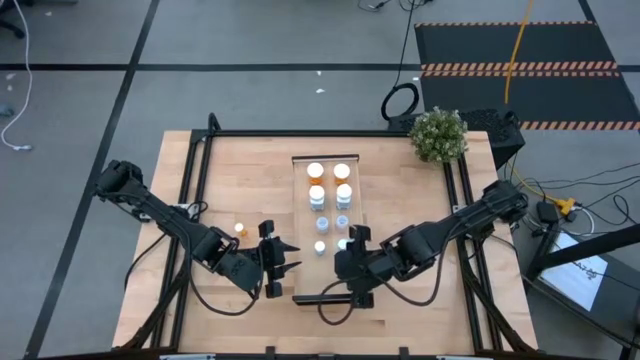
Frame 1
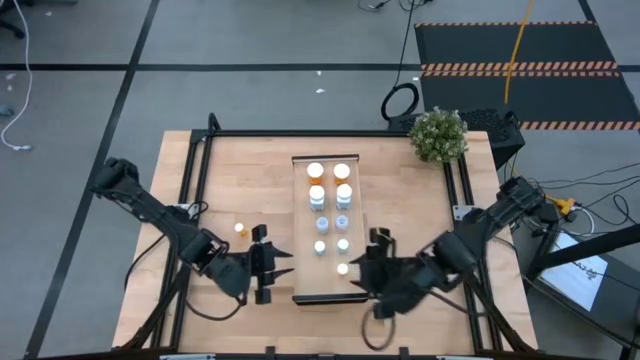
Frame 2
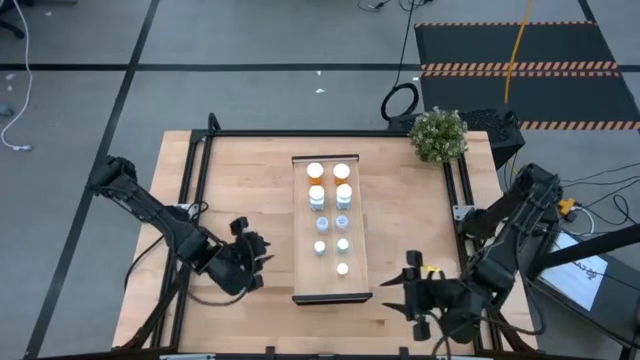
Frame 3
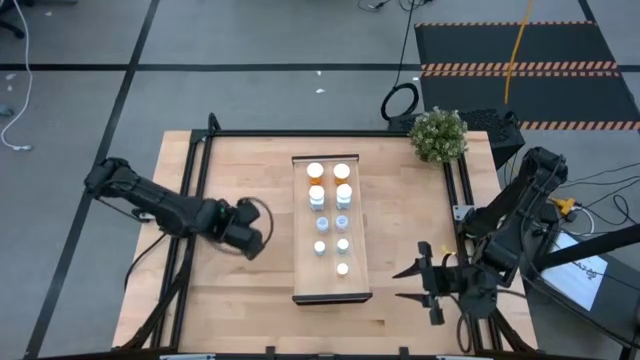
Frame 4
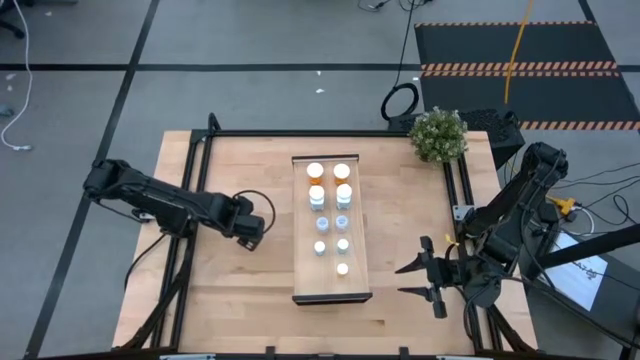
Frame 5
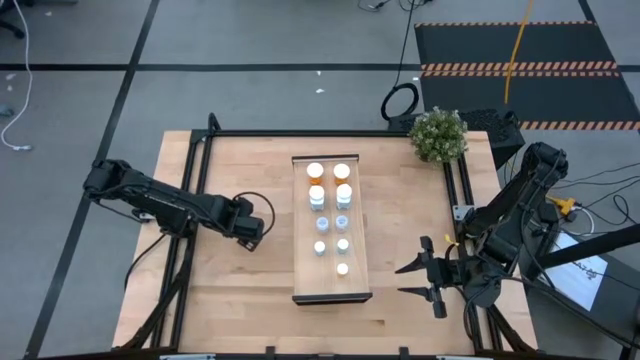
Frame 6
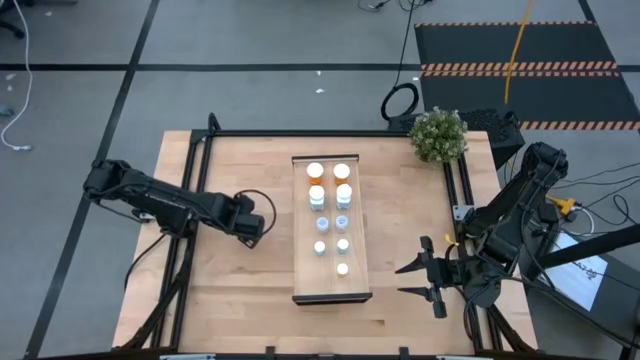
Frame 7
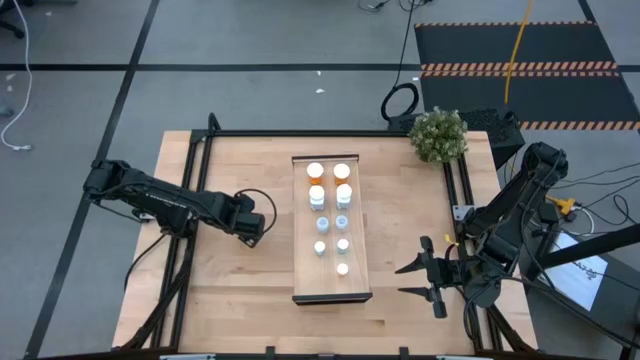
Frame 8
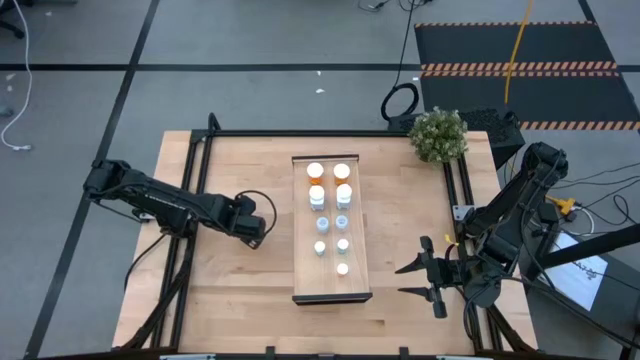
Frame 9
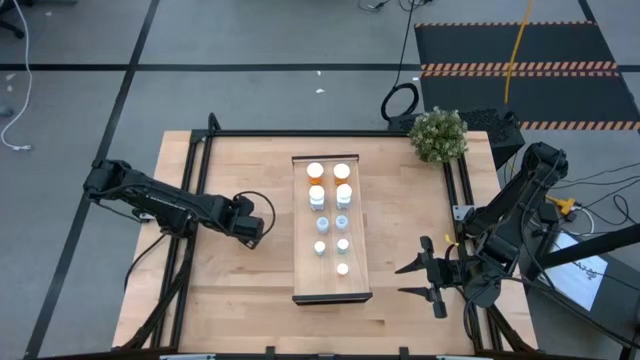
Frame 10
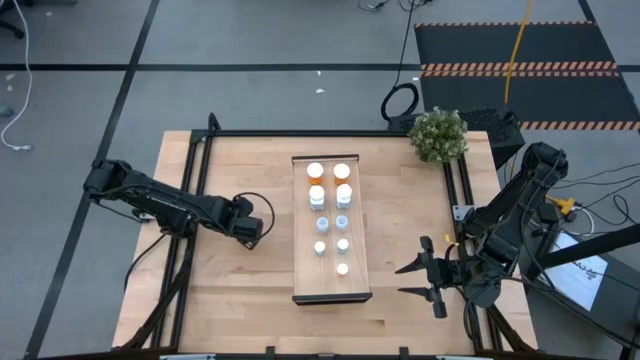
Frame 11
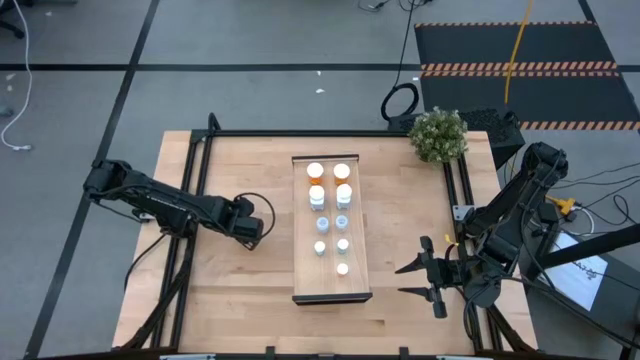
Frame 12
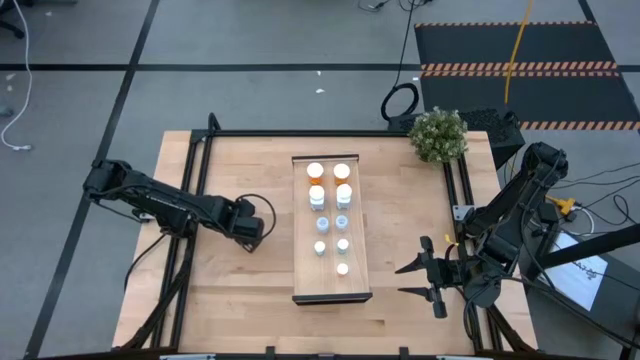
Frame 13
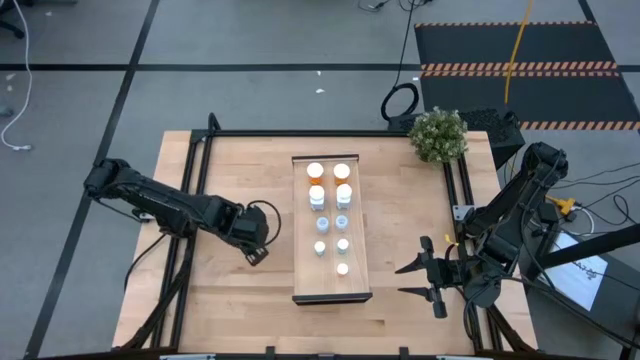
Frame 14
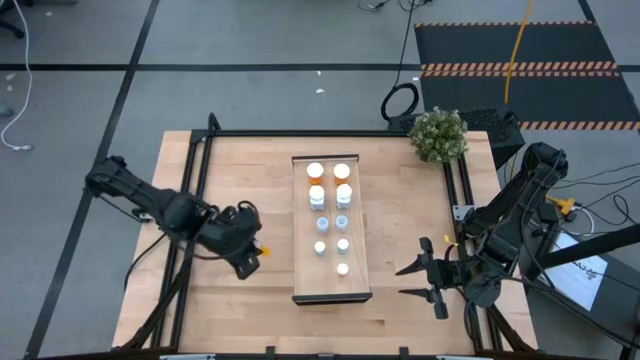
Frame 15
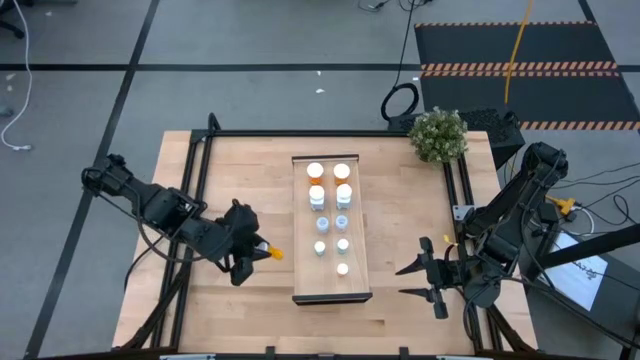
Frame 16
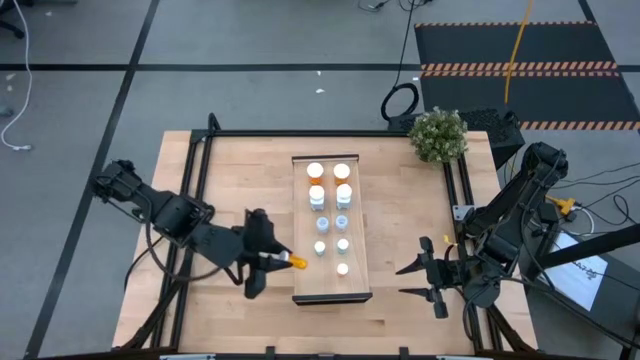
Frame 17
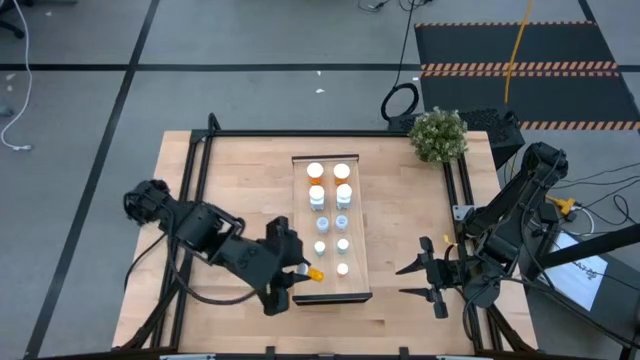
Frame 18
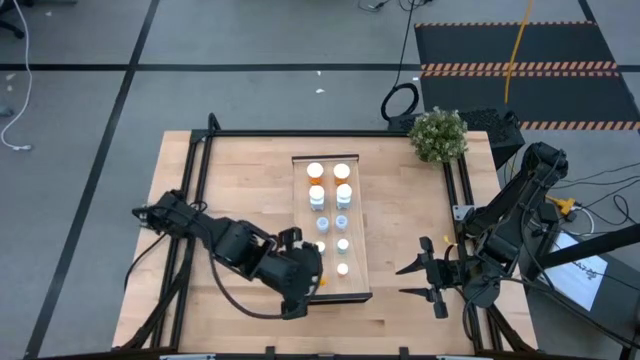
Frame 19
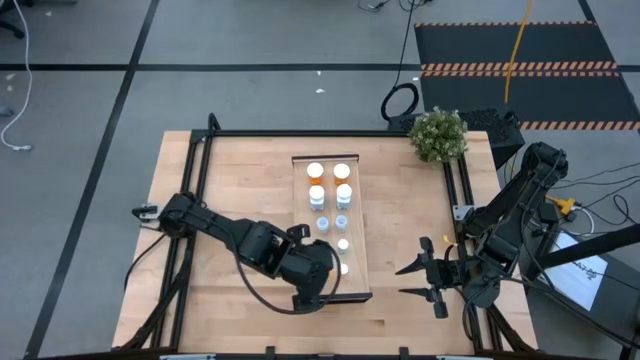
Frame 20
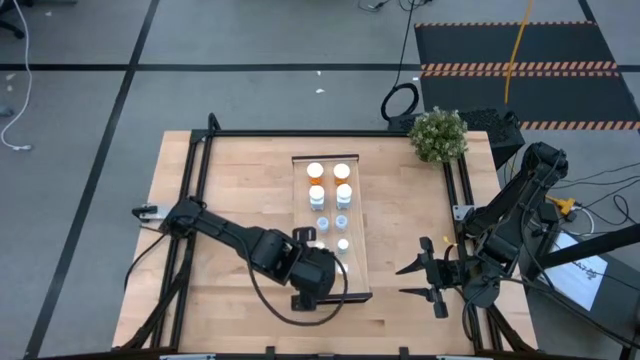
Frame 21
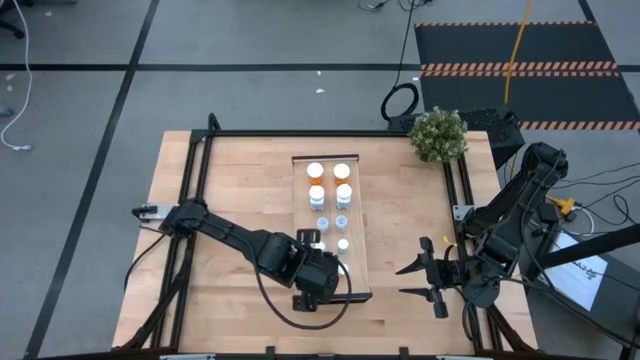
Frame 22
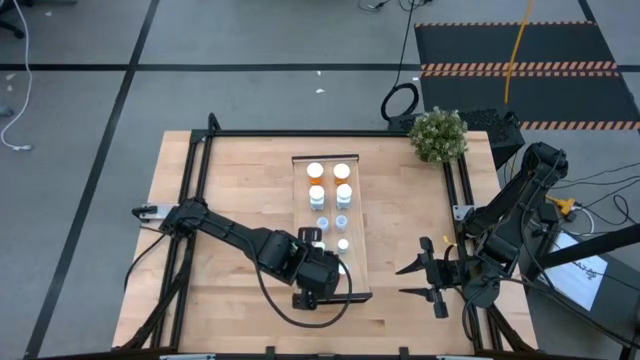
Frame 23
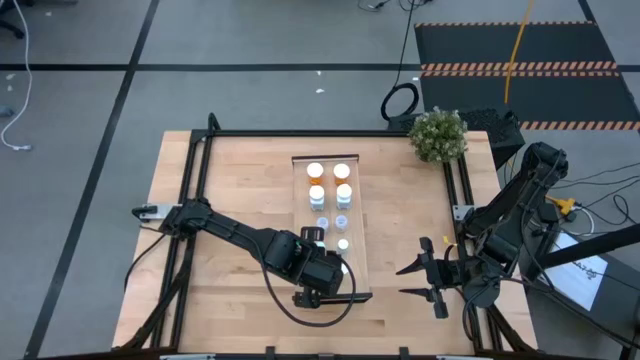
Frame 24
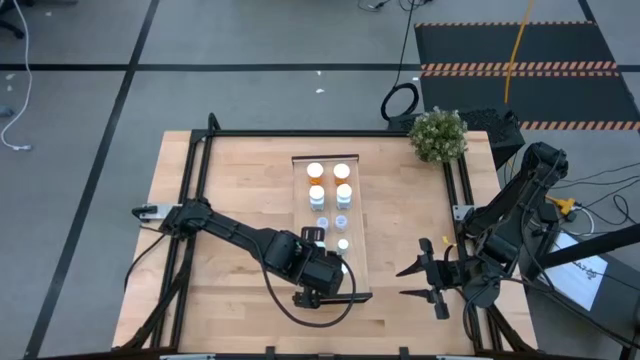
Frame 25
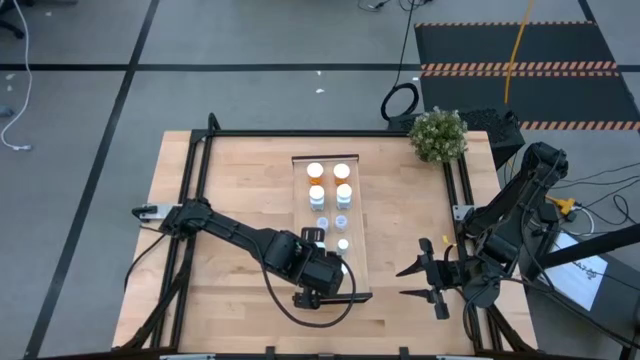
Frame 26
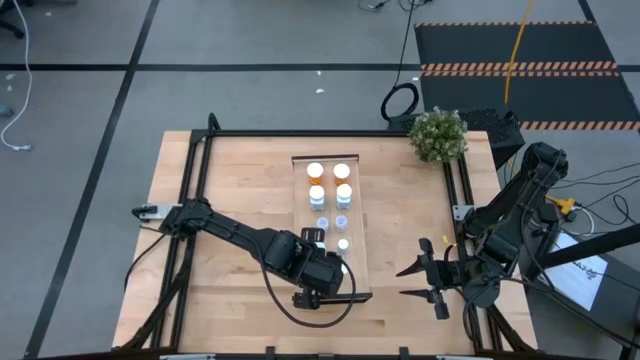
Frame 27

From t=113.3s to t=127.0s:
Task: Pick and place medicine bottles onto shelf by color
Put the orange pill on the shelf aligned with the other small orange pill bottle

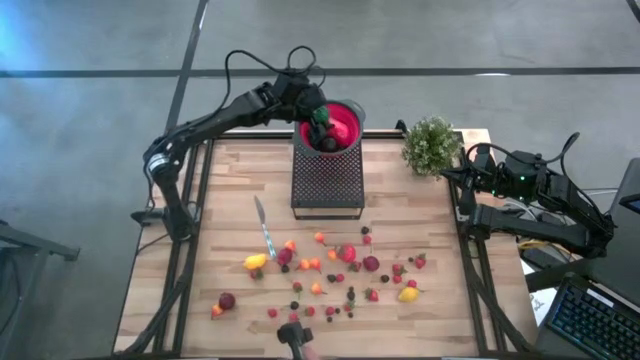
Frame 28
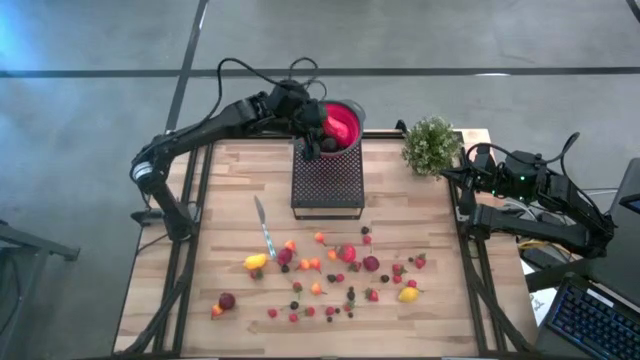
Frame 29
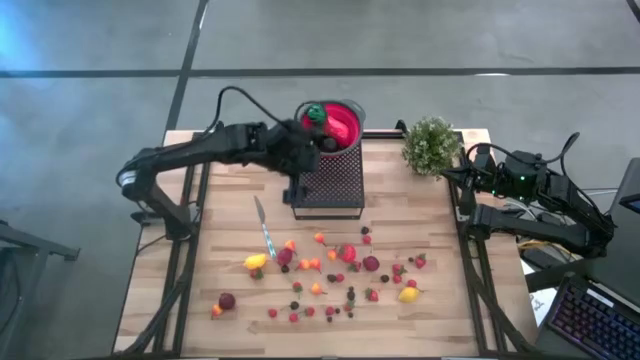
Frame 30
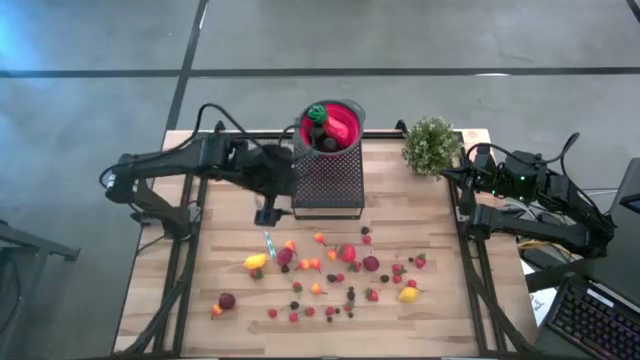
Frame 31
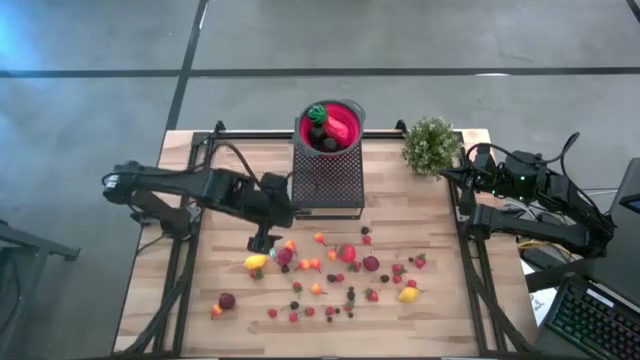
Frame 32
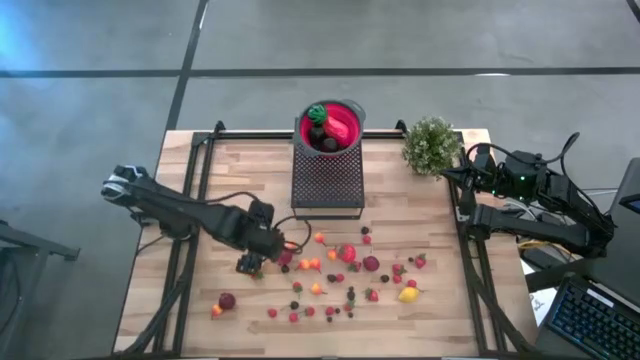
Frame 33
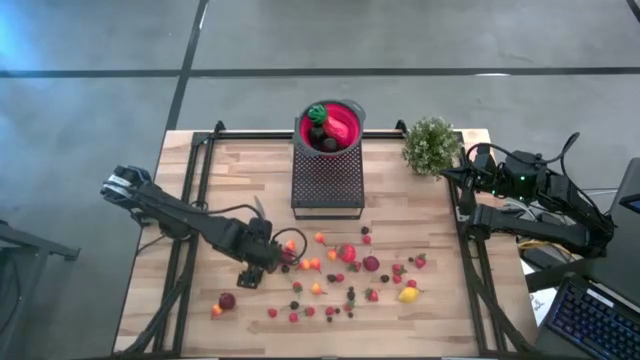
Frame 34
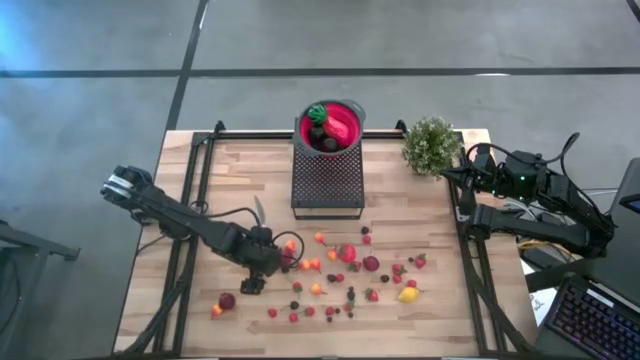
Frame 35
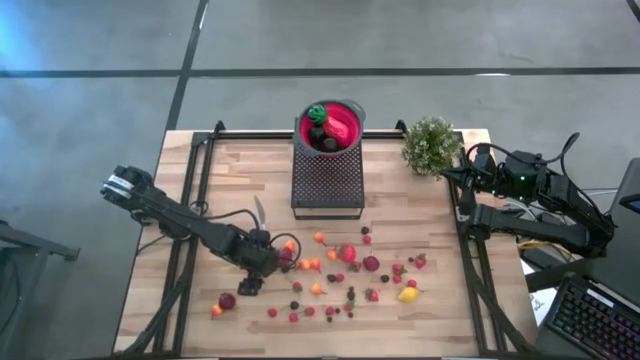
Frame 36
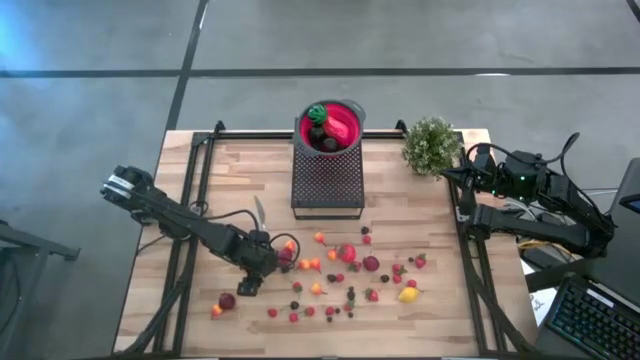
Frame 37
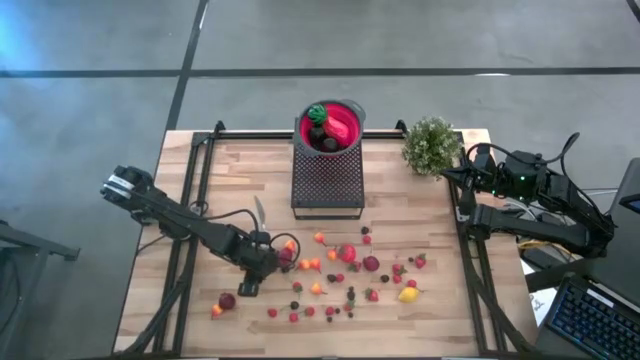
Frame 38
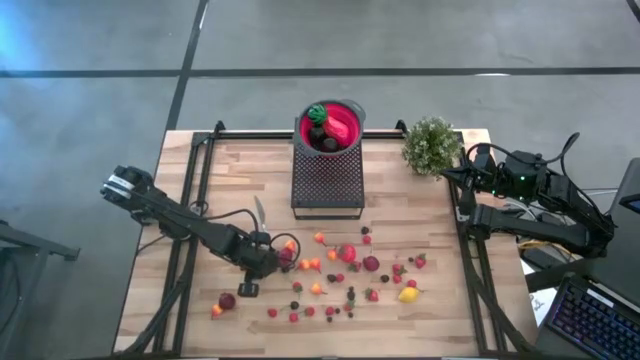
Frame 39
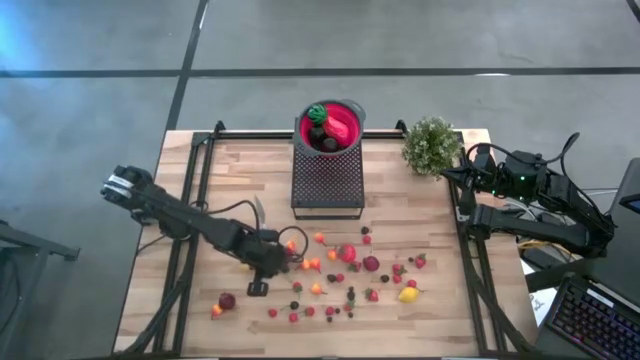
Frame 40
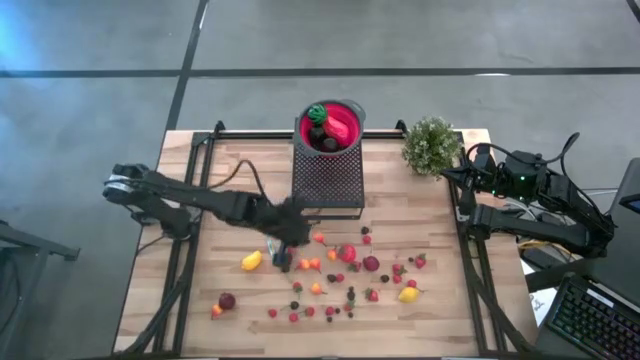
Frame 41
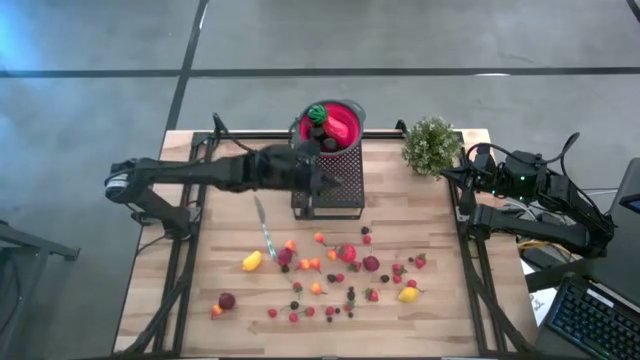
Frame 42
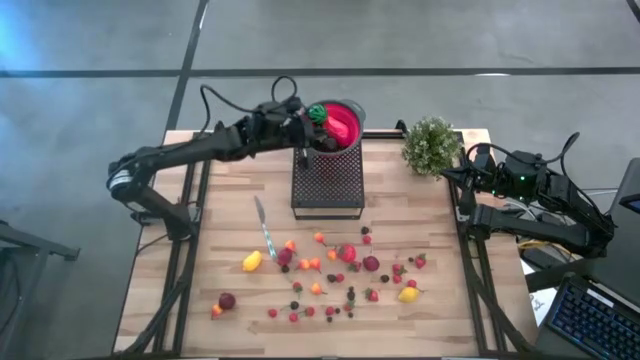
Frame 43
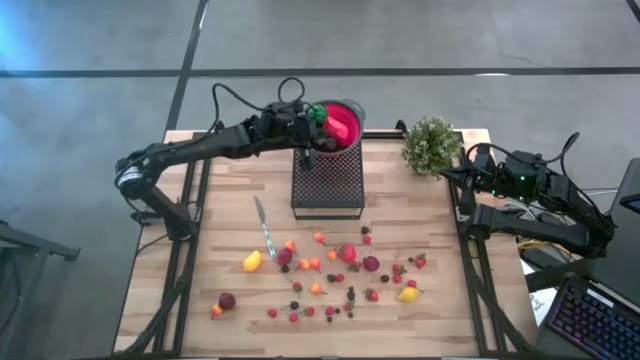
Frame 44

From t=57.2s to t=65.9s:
Task: Pick & Place Fruit
Put the strawberry into the strainer bowl on the shelf
